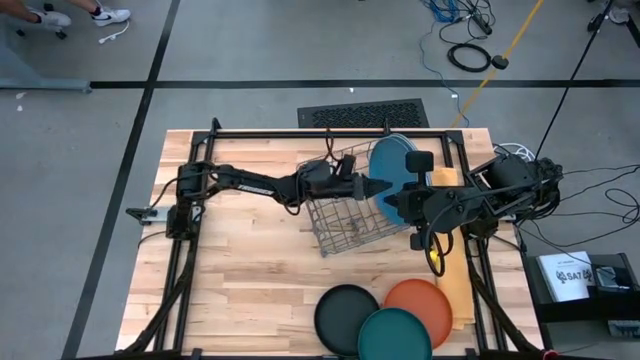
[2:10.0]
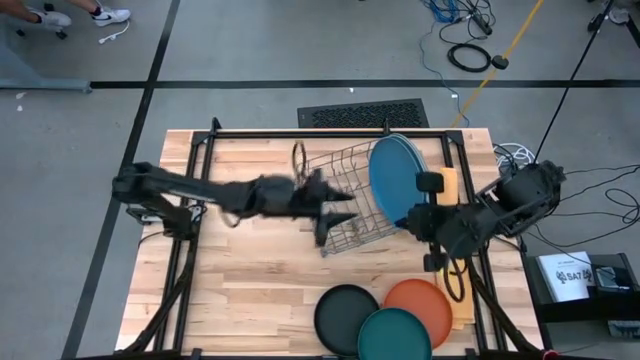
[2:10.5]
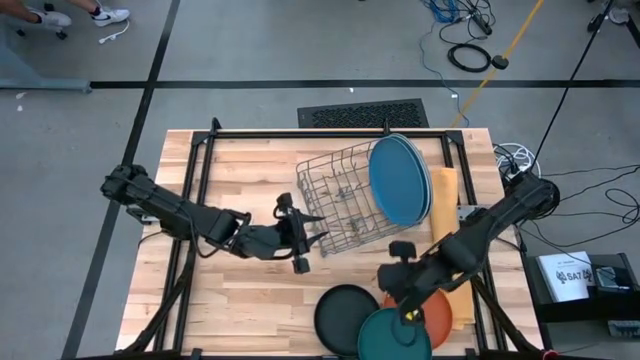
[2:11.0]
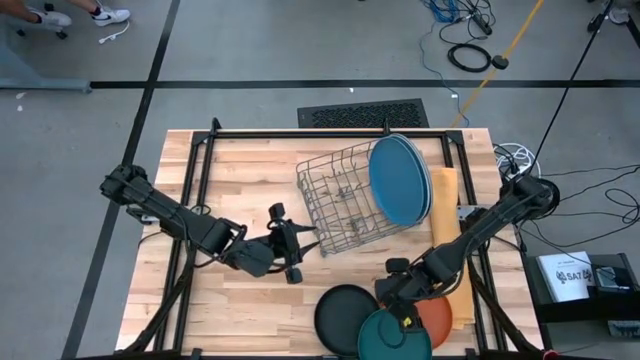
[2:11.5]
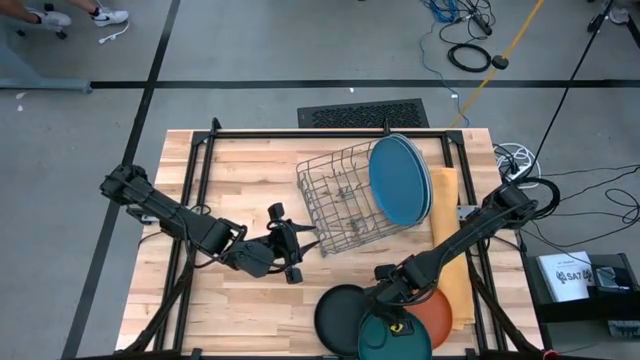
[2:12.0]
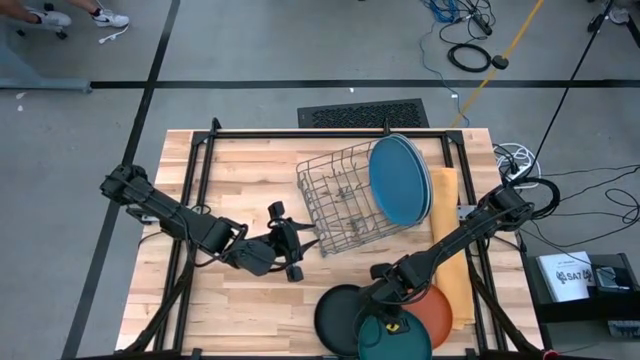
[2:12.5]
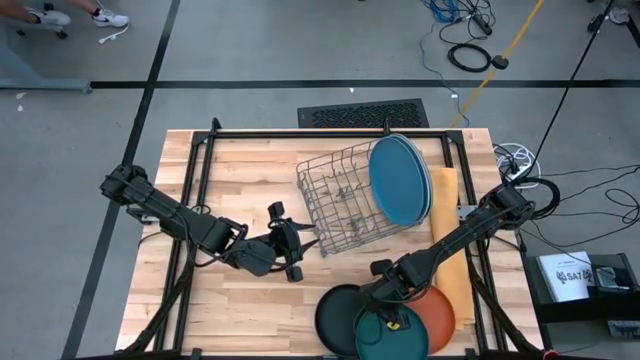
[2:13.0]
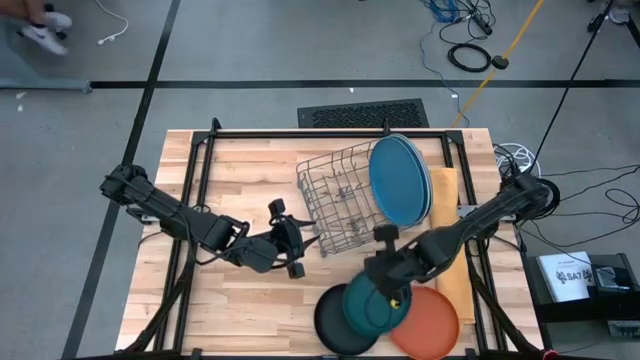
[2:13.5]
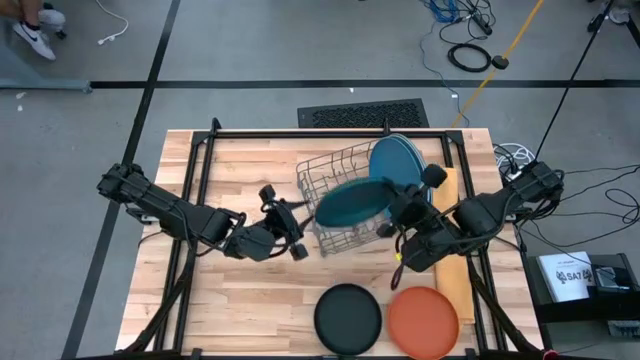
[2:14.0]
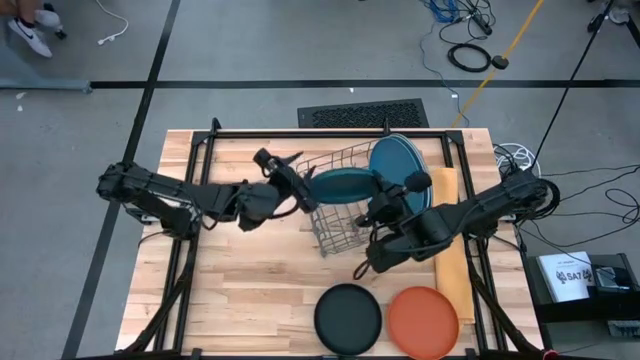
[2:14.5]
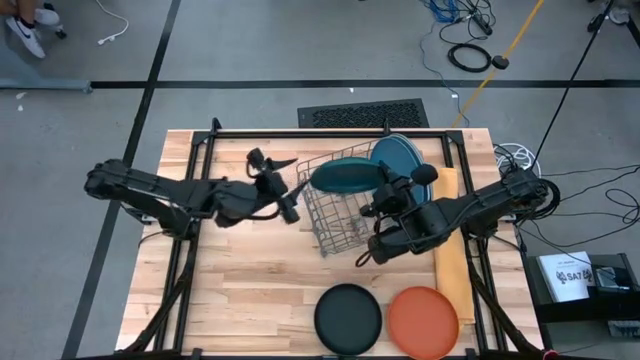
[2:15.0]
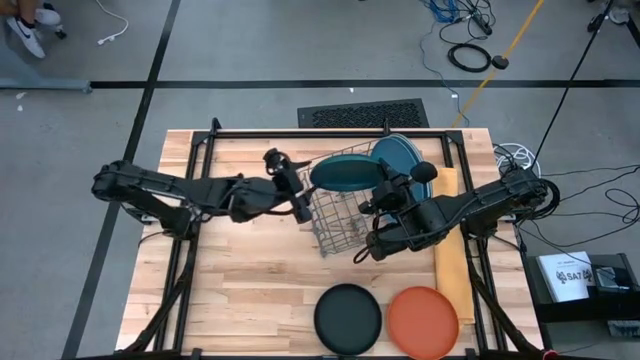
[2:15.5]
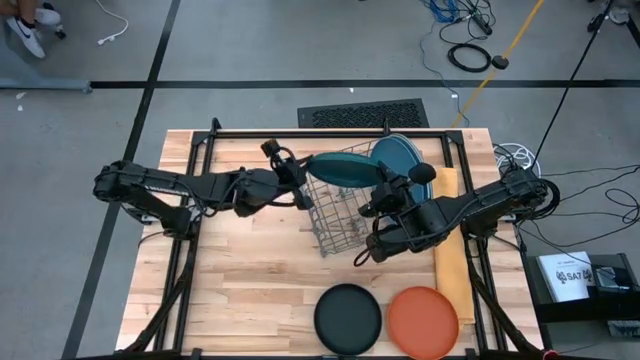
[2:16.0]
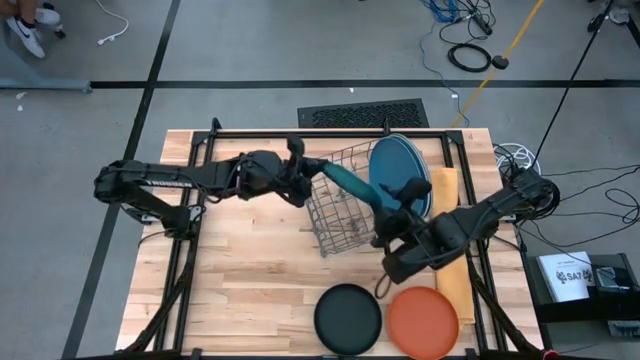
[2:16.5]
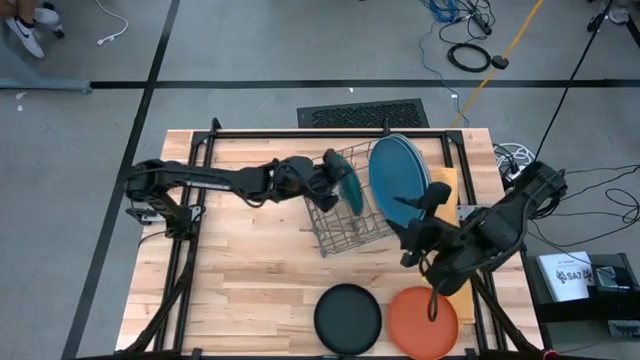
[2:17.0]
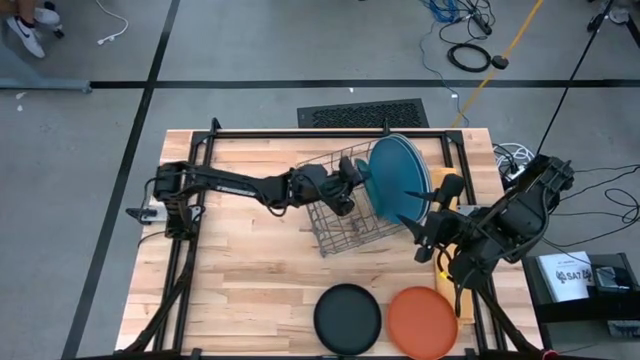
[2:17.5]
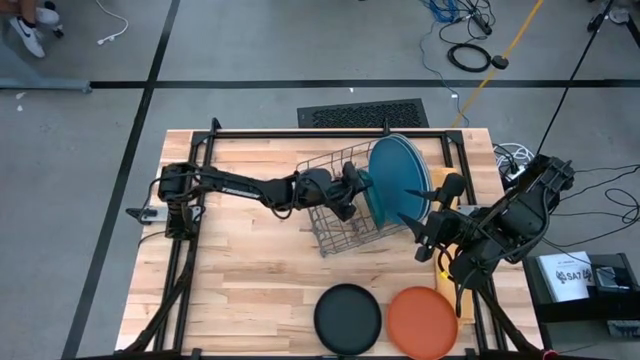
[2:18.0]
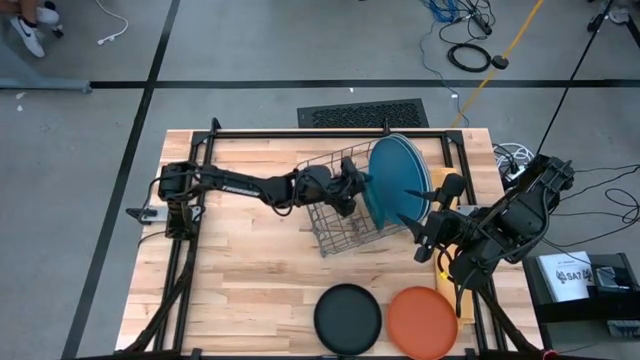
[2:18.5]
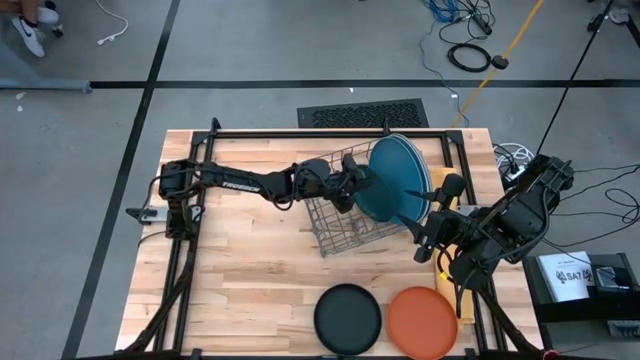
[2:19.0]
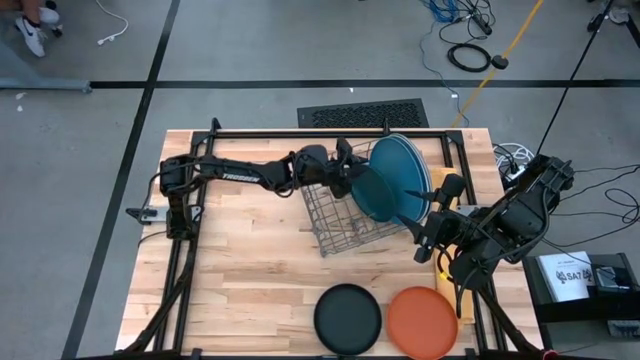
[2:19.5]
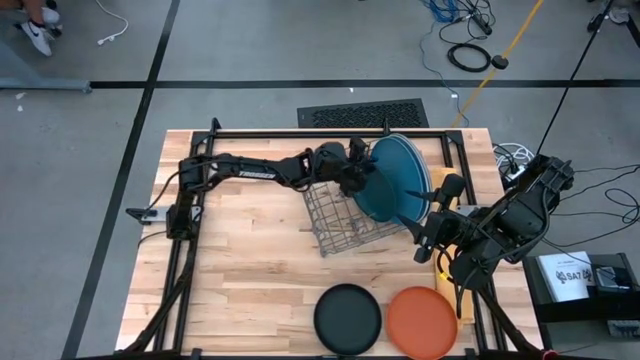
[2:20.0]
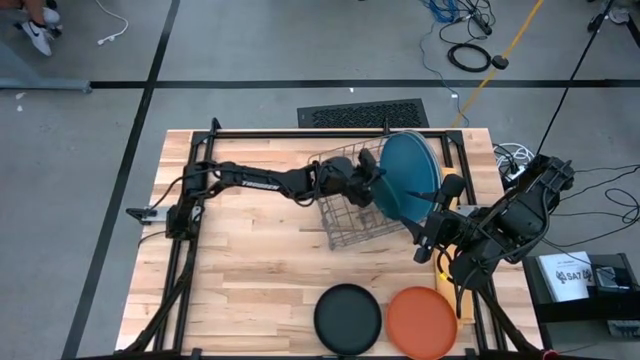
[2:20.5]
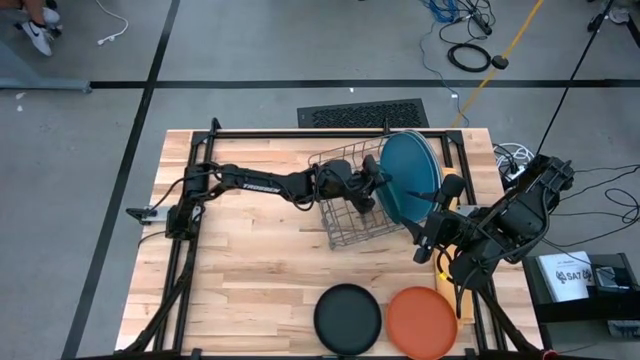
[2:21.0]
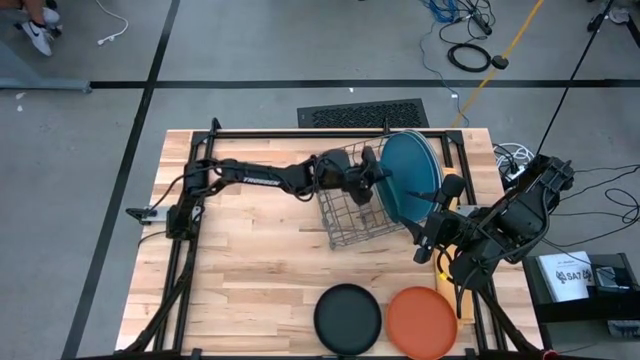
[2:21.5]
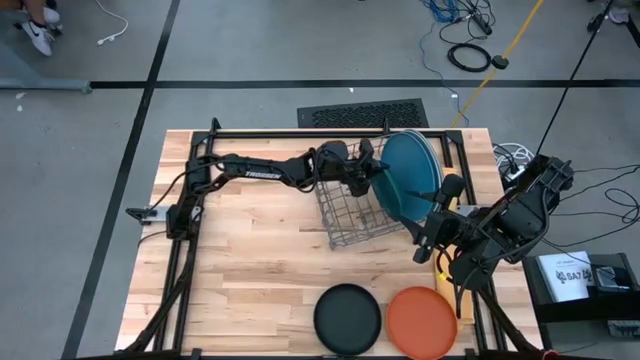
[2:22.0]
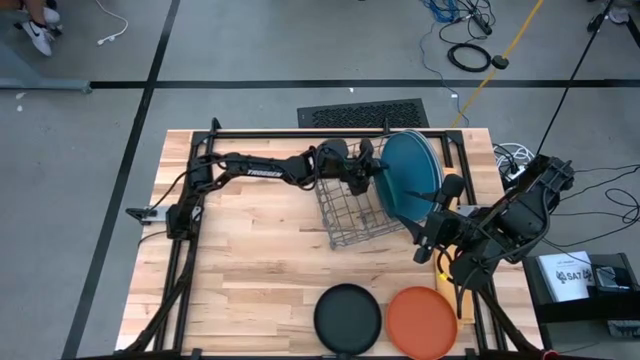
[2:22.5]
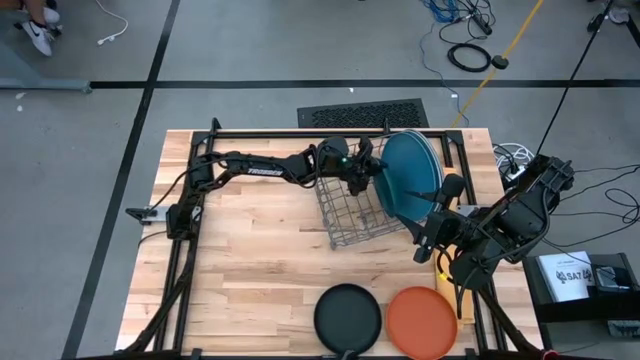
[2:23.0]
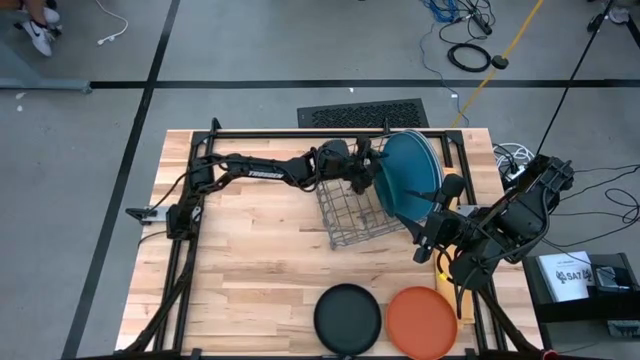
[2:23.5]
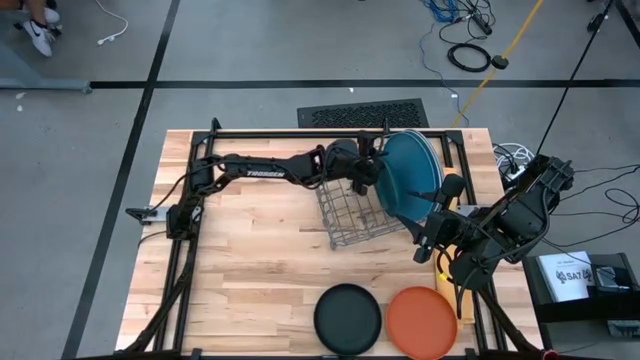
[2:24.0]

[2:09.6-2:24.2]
Task: Sort dishes
Put the dark green plate into the dish rack

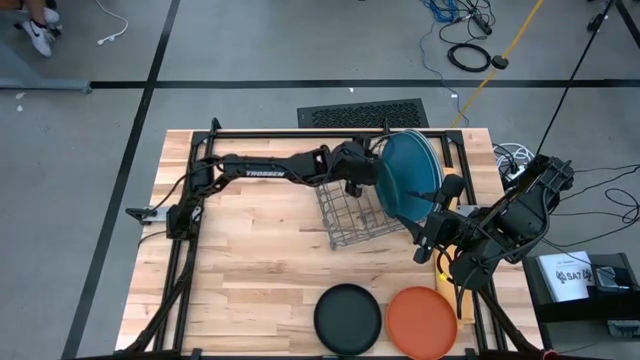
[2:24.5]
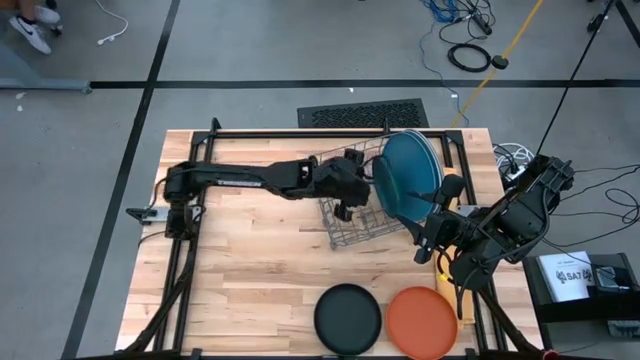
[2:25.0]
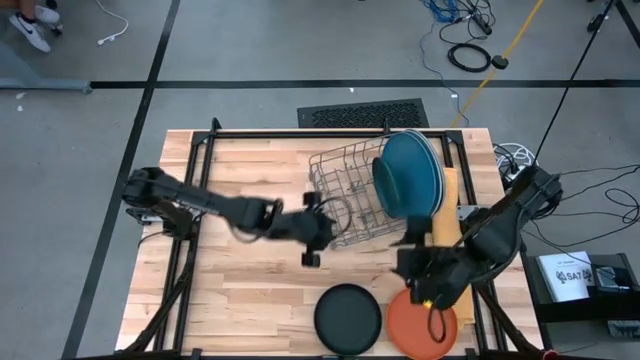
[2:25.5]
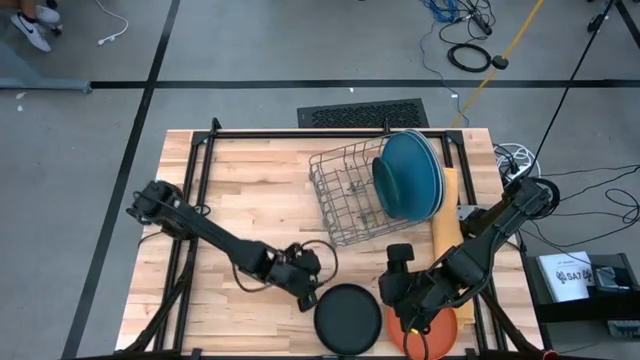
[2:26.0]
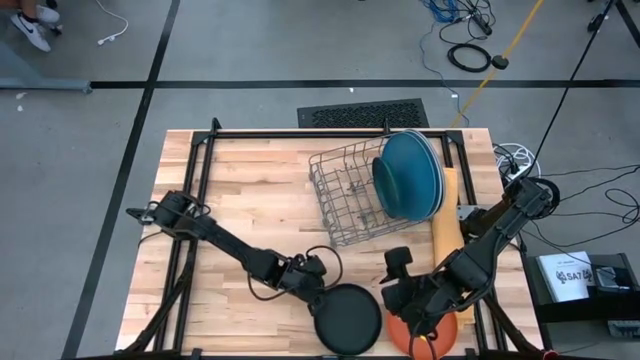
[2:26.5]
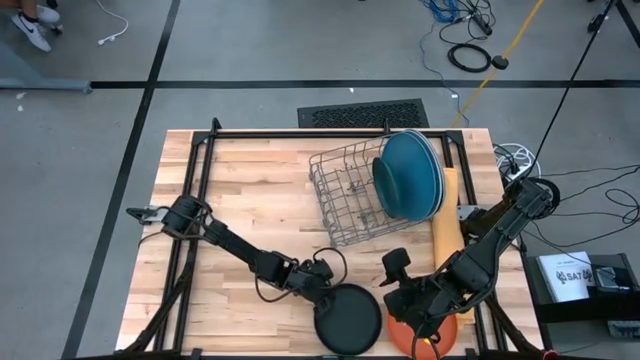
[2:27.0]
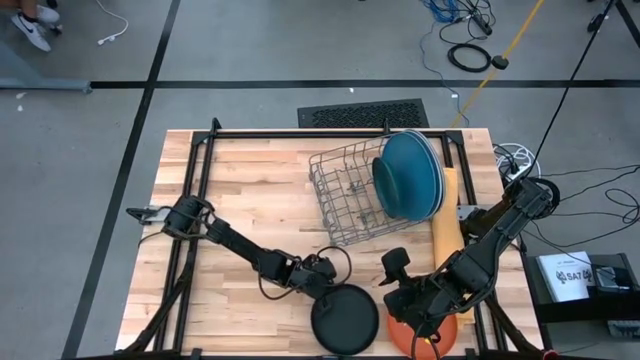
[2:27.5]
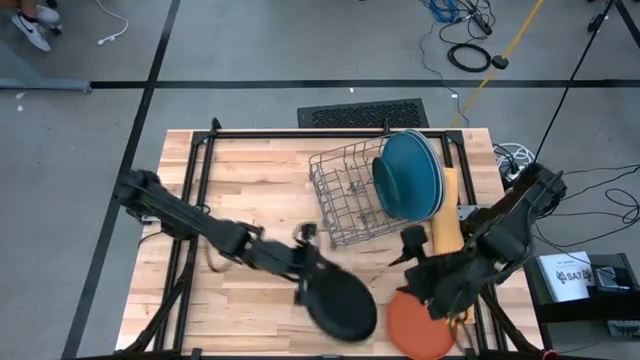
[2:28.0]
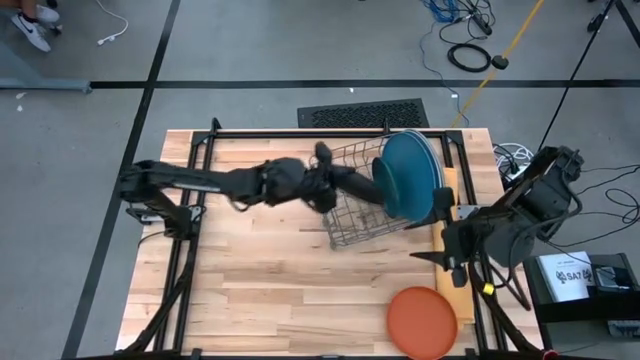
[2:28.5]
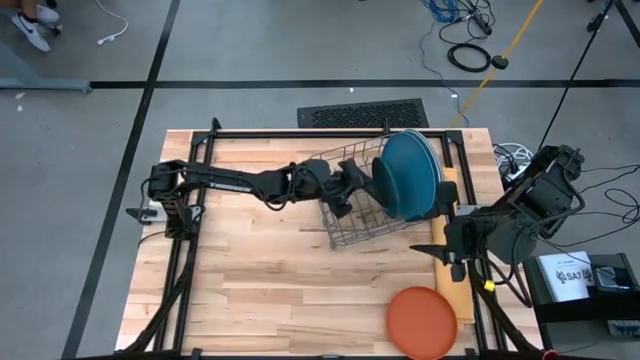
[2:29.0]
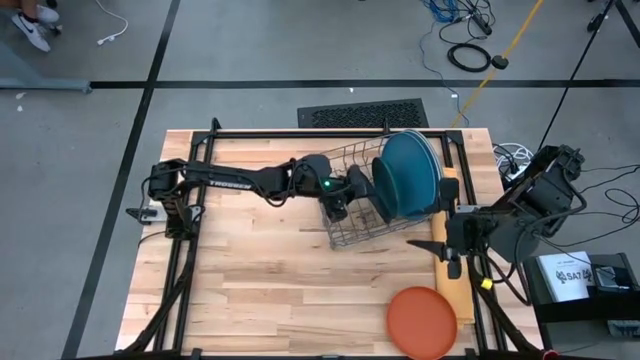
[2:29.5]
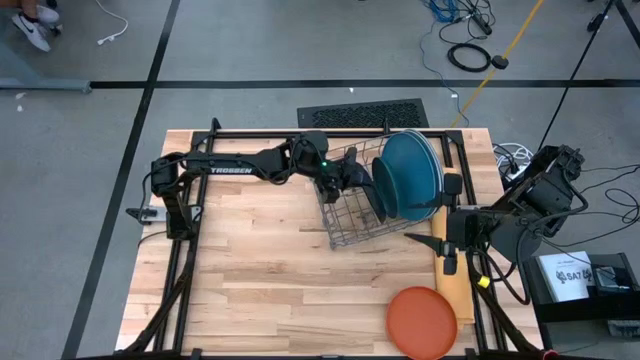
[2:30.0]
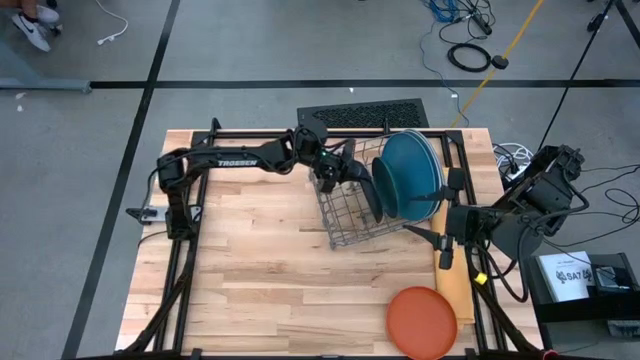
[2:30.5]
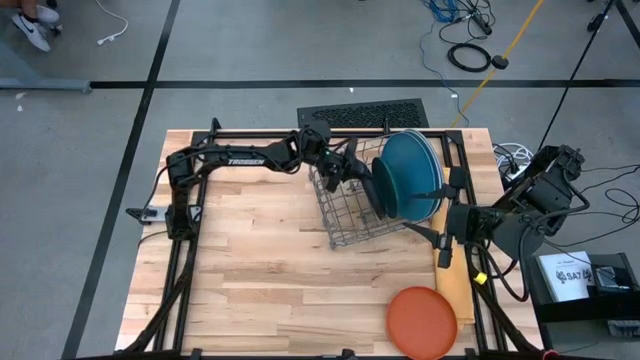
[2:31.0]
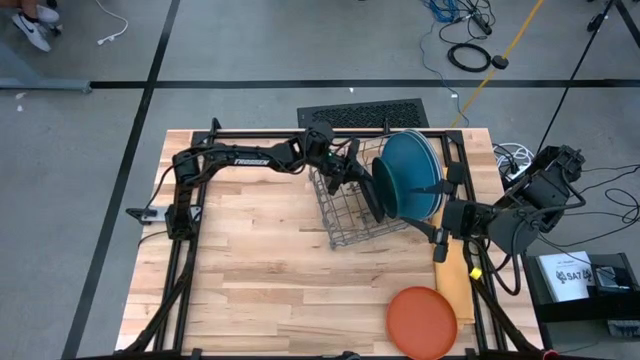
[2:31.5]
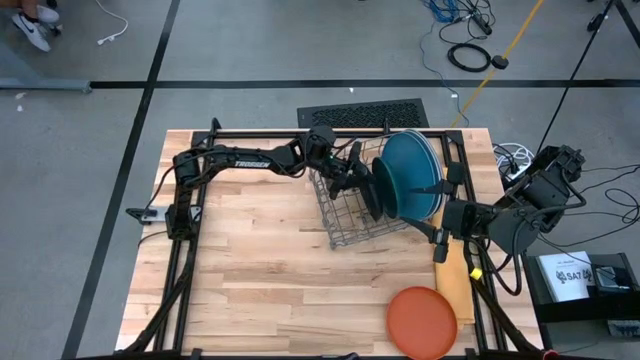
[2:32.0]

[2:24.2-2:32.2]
Put the black plate into the dish rack
